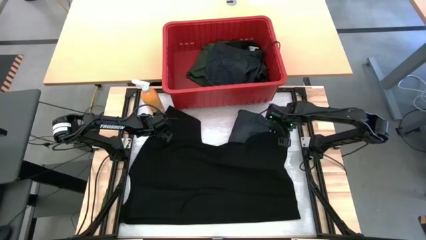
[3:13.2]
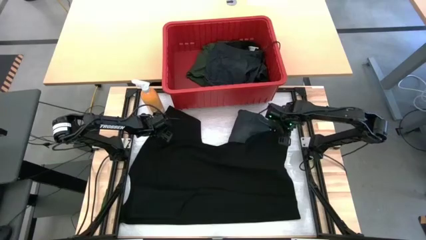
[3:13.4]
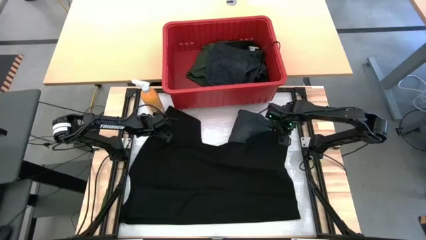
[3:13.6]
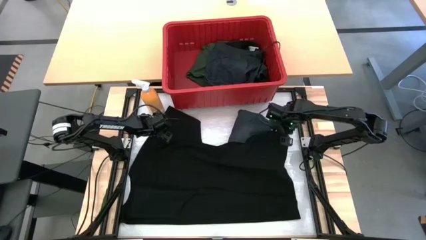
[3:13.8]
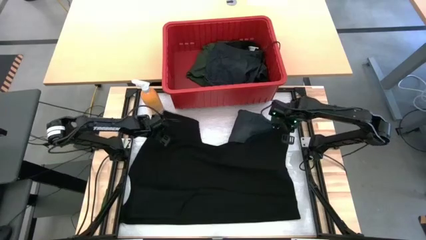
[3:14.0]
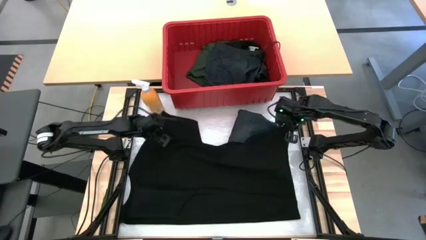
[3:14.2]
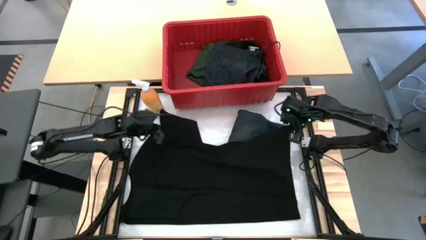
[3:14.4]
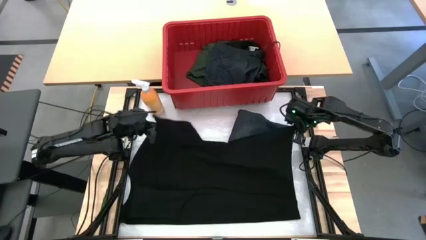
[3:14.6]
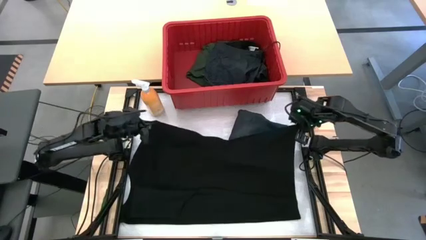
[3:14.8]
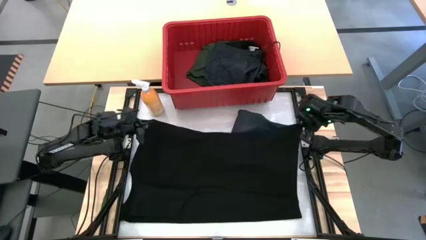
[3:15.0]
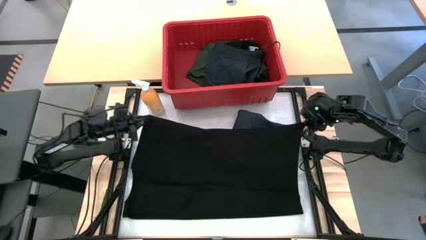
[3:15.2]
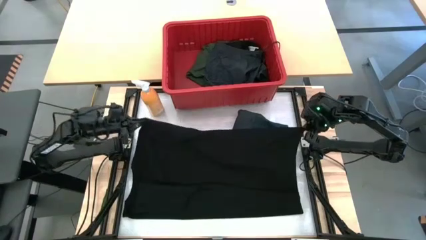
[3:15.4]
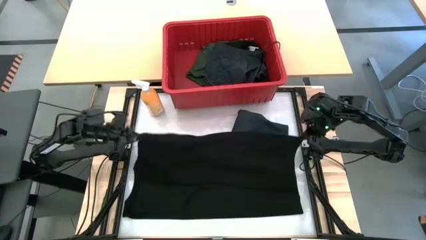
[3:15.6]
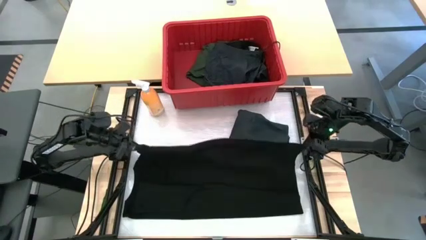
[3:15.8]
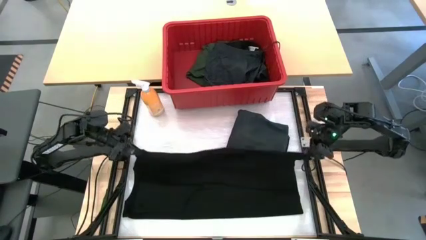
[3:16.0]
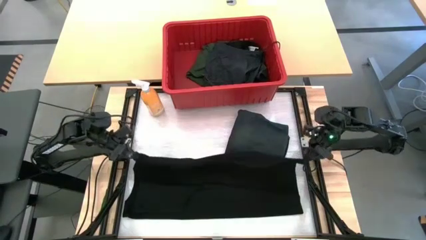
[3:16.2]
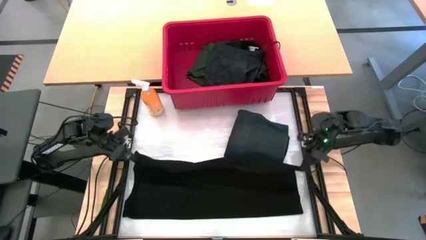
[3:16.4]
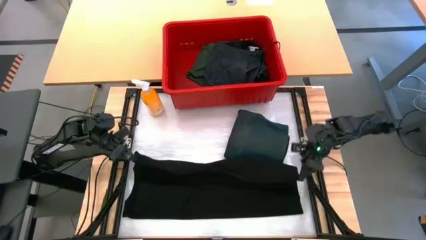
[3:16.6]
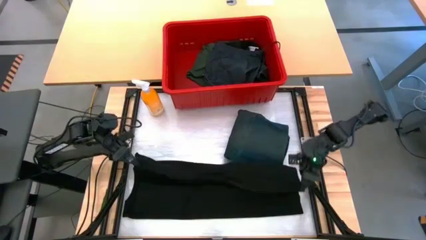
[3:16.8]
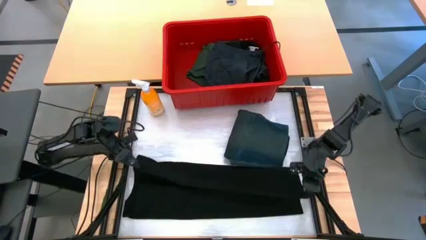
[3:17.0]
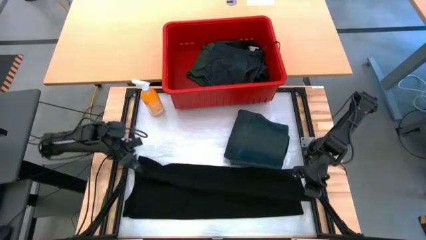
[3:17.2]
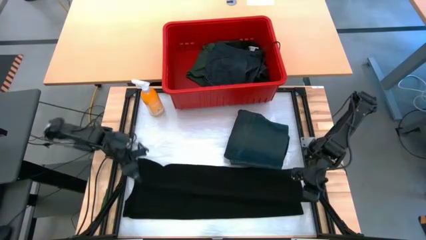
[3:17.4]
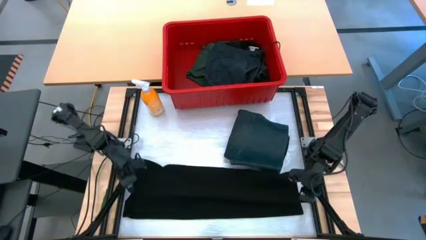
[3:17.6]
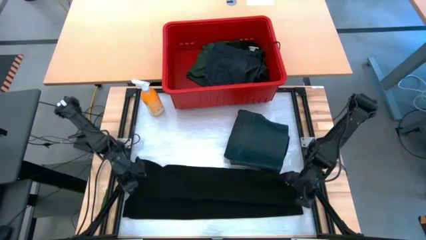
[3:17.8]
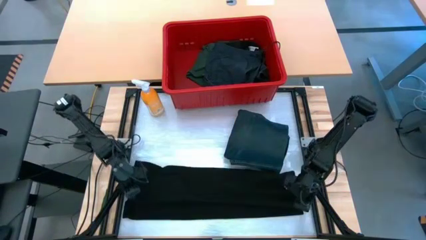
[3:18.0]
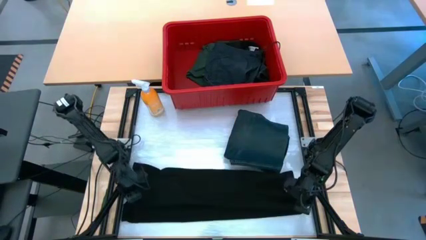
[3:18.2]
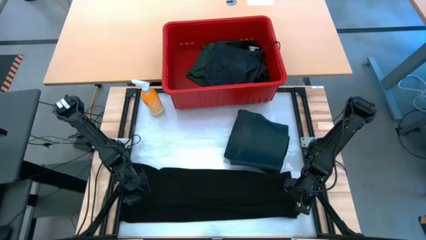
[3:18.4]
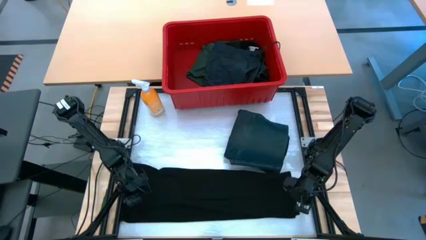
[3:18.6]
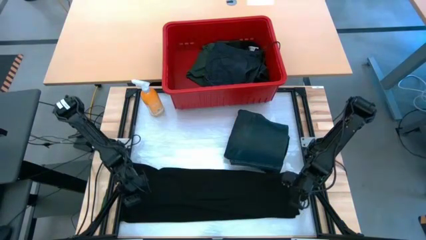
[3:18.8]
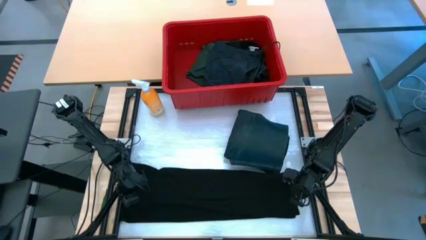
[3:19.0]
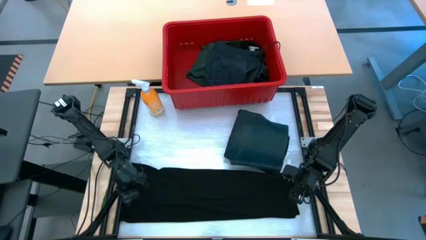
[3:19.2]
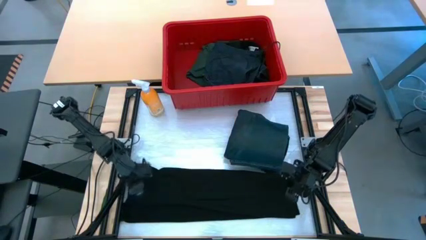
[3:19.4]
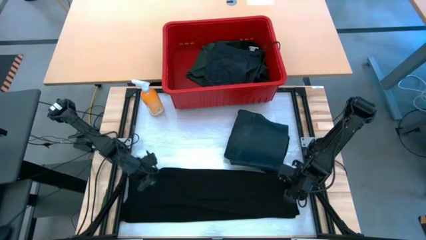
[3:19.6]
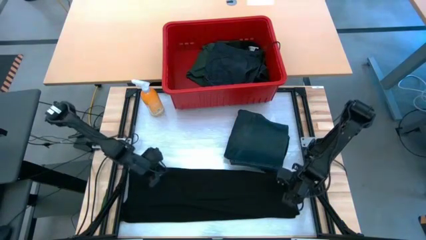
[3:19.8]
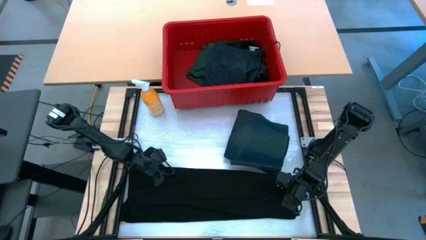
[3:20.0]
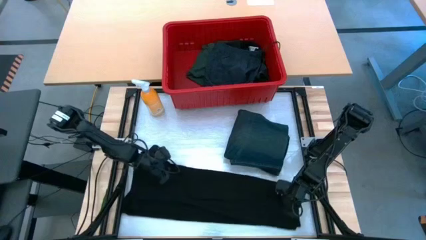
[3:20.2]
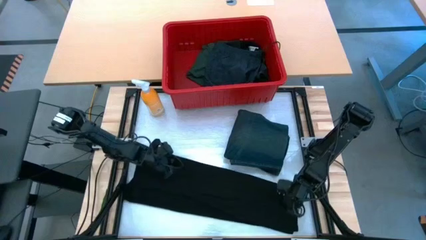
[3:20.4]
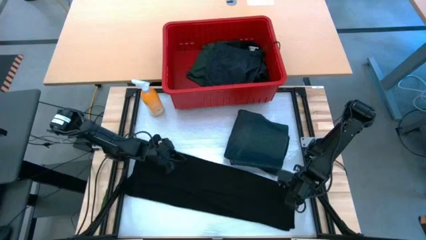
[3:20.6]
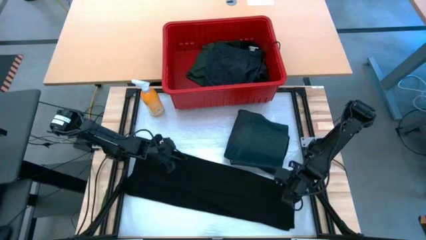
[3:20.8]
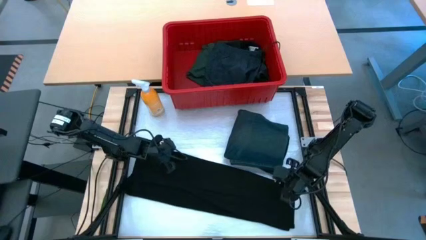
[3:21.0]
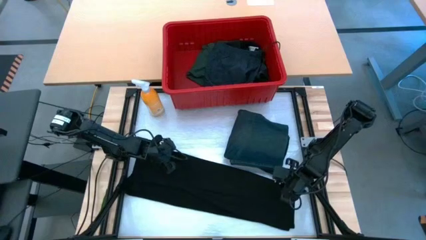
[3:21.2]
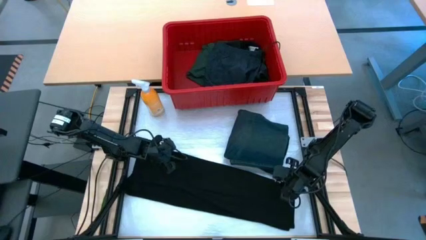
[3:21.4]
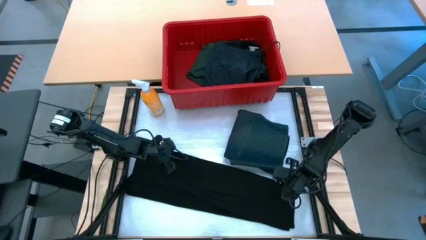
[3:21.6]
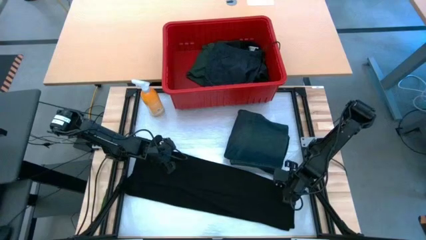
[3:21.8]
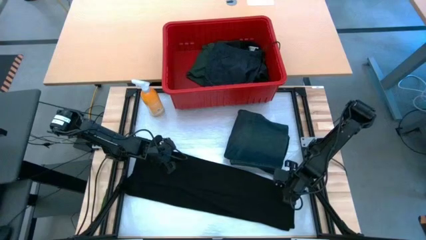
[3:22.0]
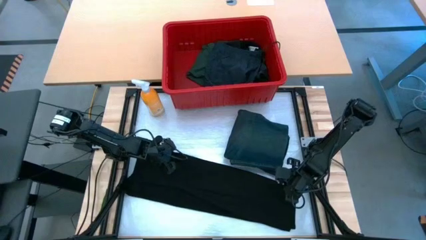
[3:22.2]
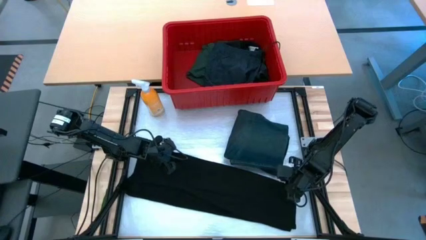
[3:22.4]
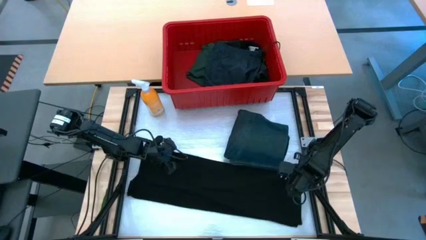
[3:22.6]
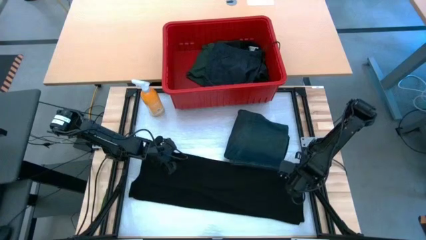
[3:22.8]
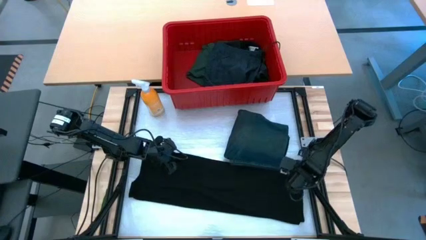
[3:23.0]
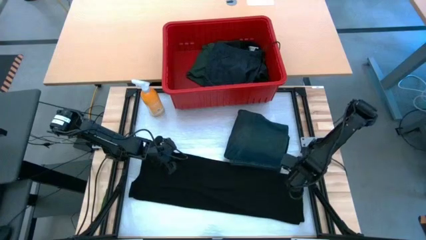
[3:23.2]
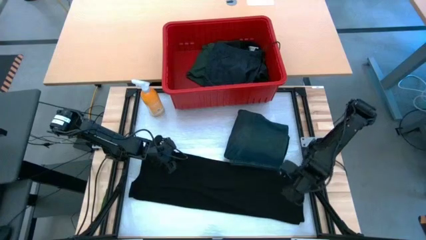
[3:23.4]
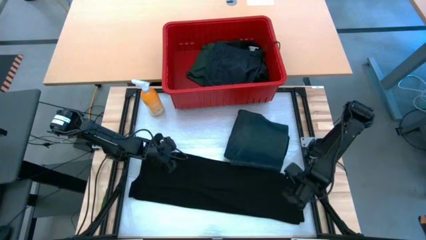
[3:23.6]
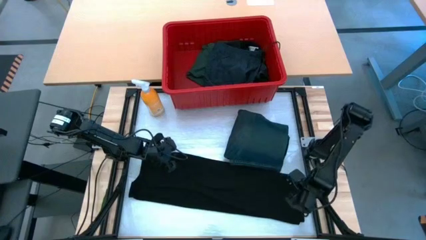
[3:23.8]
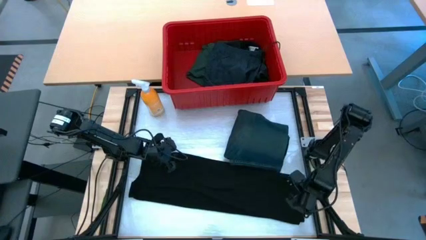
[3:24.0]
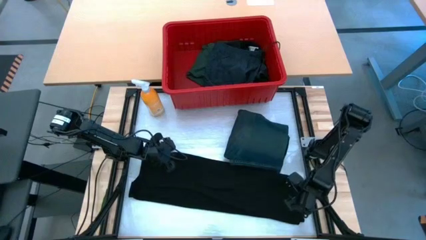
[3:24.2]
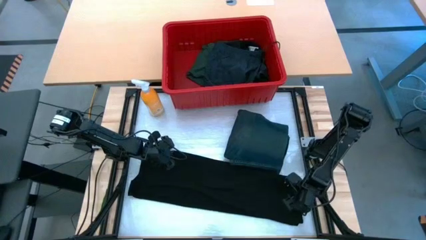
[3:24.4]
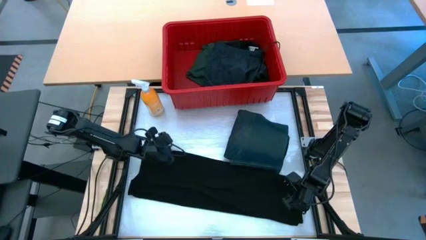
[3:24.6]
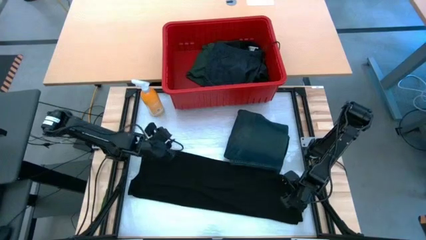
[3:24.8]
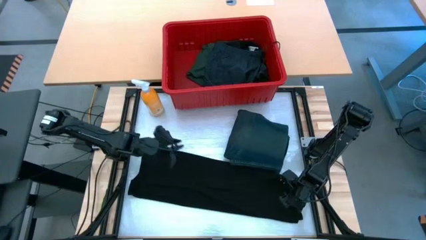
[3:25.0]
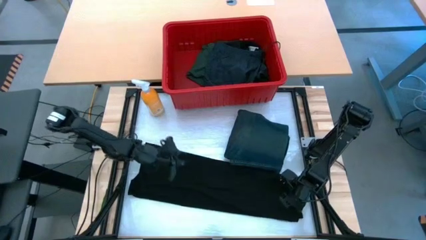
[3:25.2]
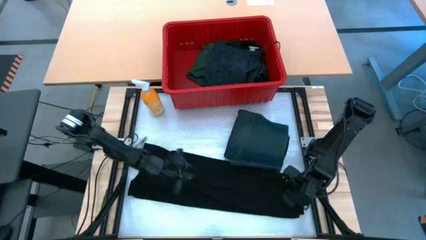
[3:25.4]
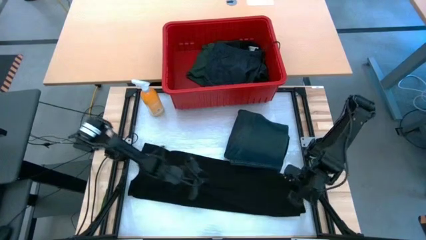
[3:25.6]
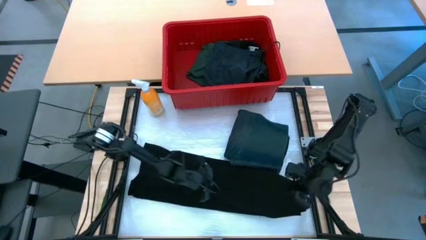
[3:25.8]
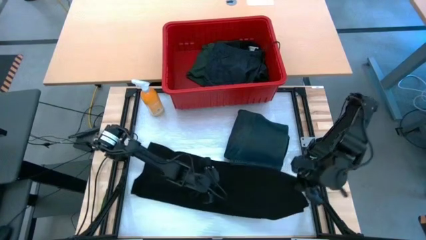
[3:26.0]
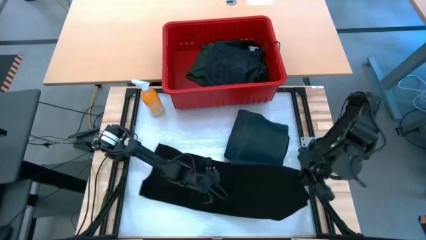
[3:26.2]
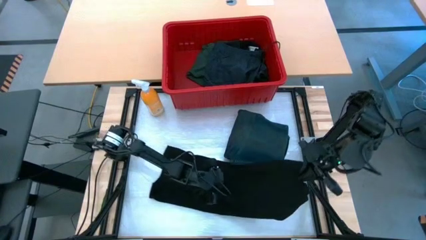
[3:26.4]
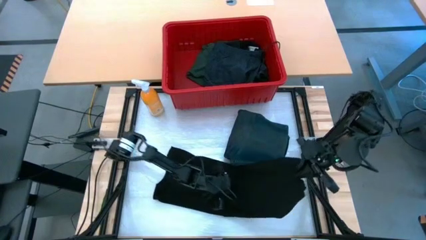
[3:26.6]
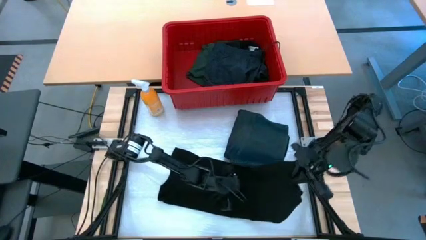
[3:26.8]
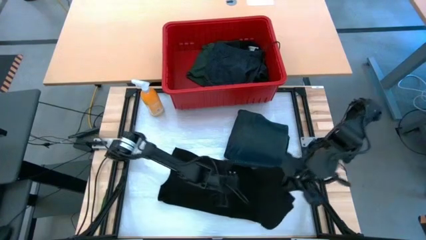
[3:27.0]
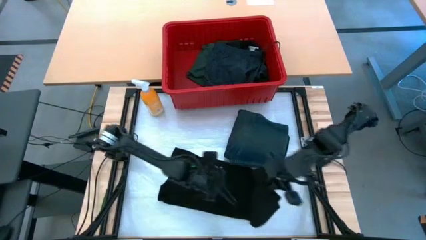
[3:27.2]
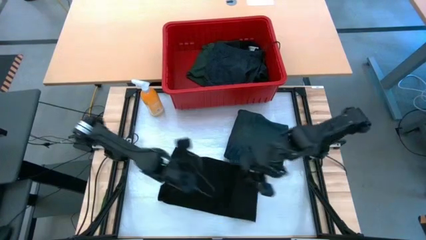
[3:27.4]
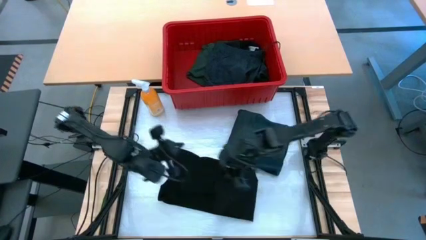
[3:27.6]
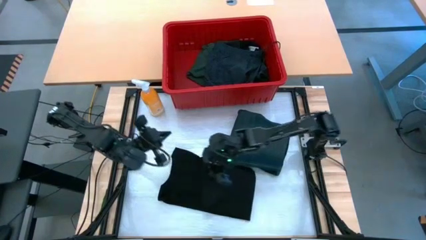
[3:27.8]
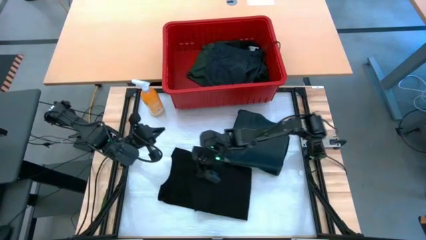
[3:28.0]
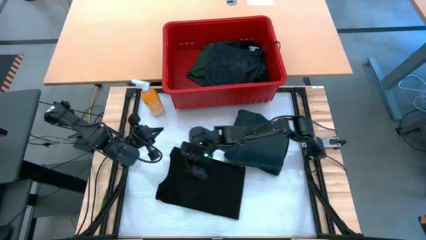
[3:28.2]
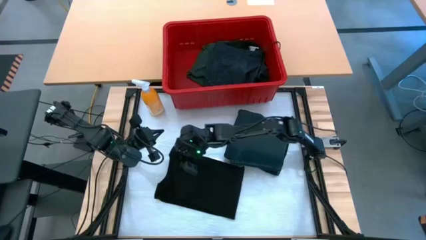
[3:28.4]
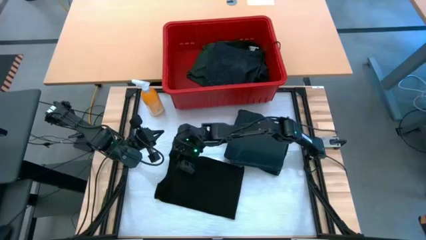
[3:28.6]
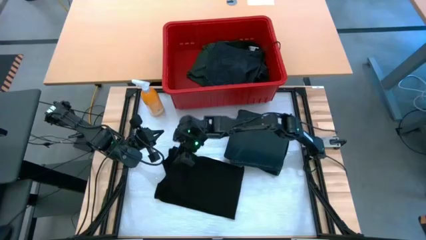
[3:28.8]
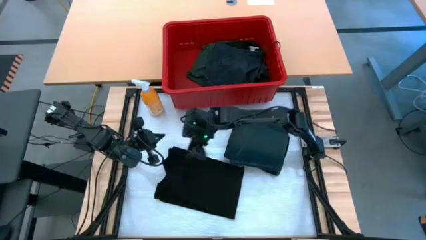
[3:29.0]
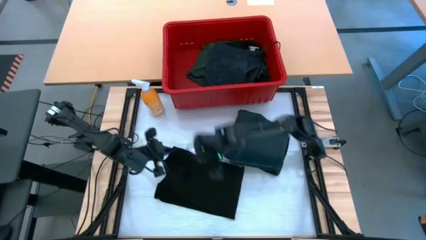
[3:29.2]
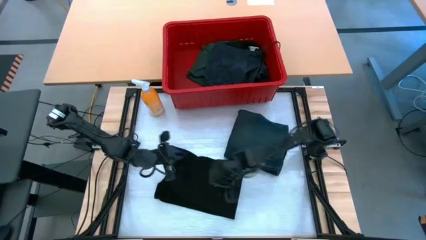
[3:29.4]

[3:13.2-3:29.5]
Task: Fold Laundry from Bin
Fold the black shirt
